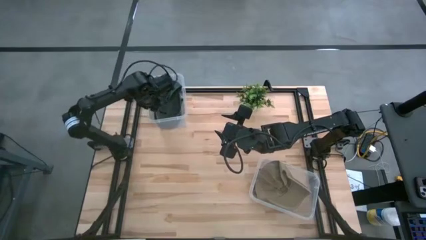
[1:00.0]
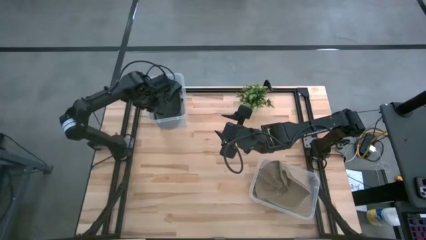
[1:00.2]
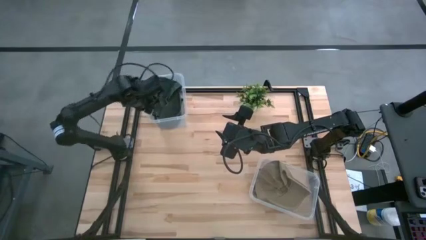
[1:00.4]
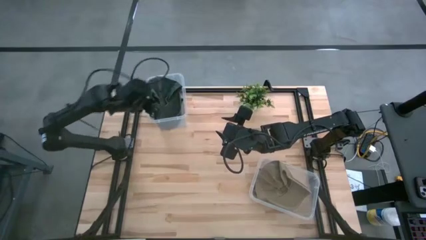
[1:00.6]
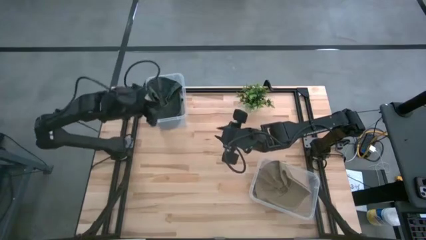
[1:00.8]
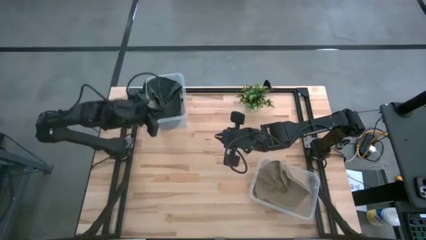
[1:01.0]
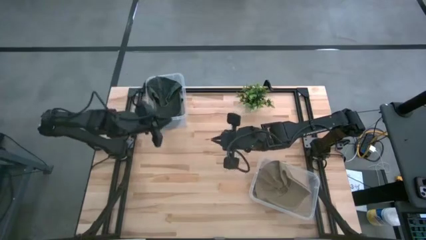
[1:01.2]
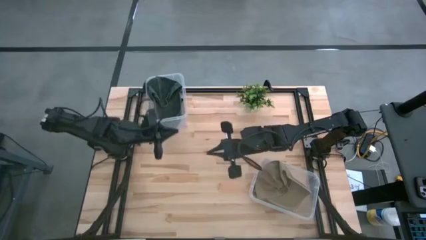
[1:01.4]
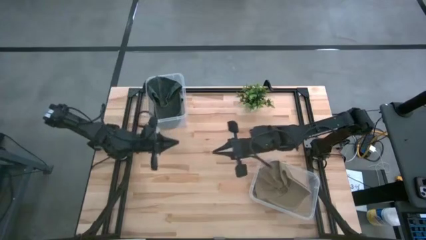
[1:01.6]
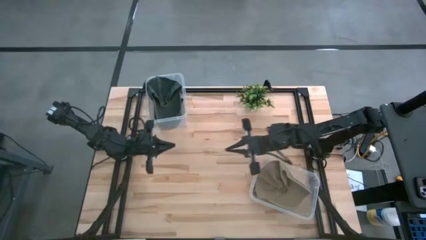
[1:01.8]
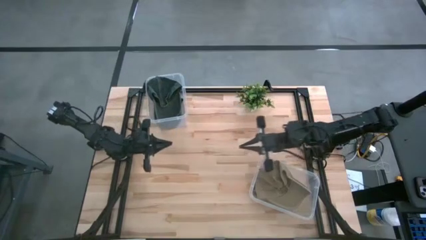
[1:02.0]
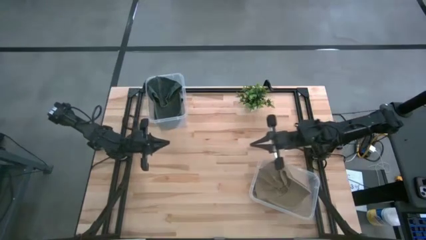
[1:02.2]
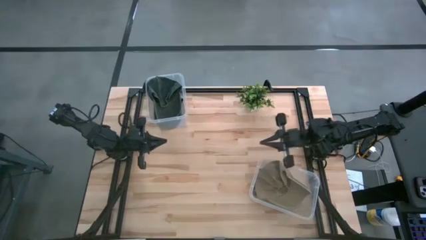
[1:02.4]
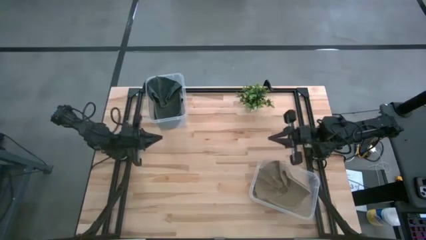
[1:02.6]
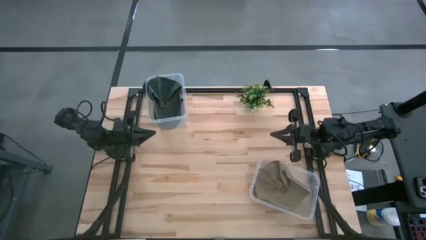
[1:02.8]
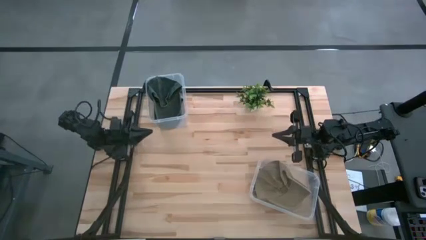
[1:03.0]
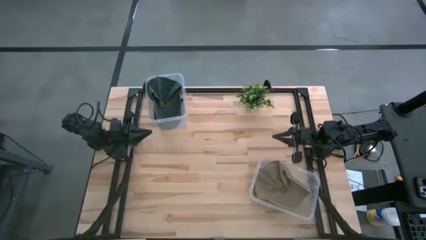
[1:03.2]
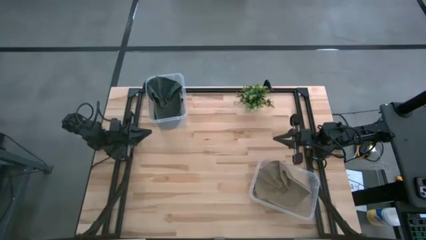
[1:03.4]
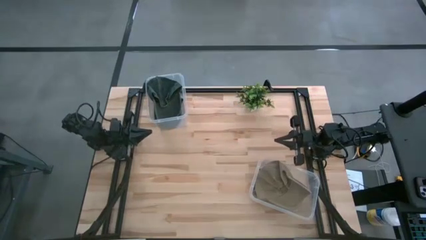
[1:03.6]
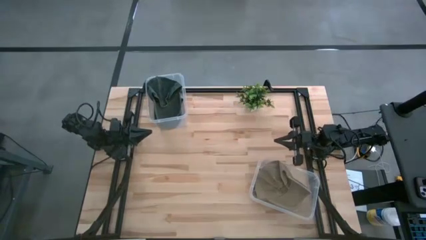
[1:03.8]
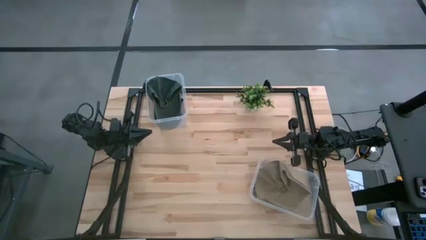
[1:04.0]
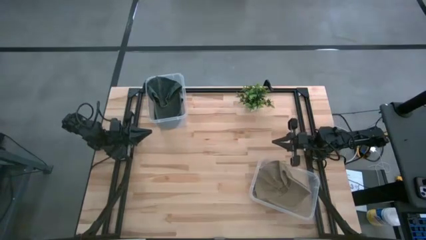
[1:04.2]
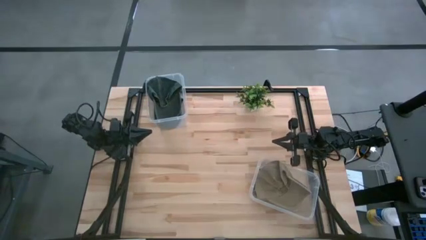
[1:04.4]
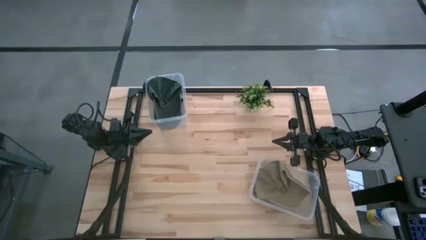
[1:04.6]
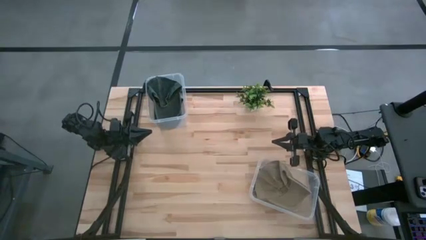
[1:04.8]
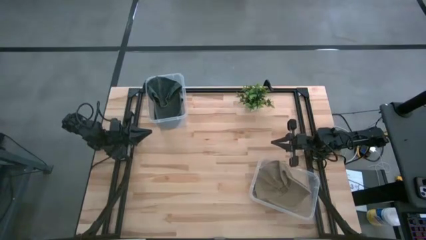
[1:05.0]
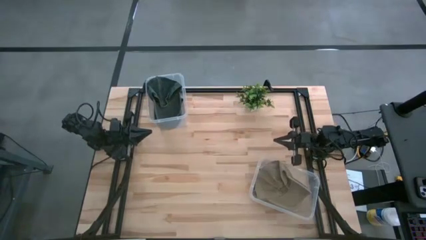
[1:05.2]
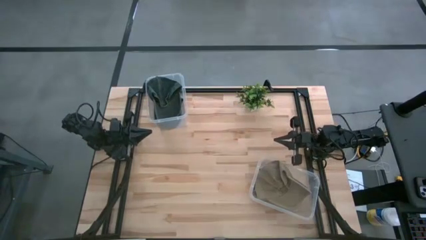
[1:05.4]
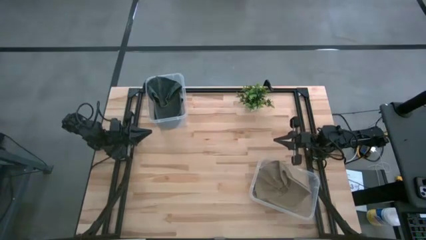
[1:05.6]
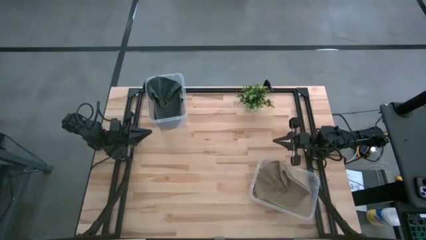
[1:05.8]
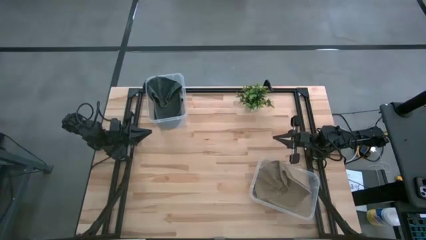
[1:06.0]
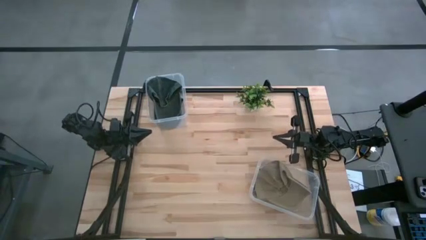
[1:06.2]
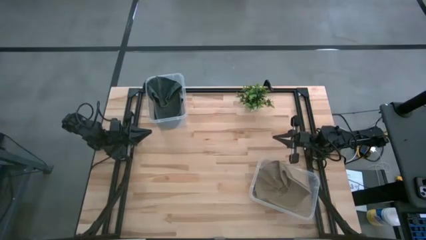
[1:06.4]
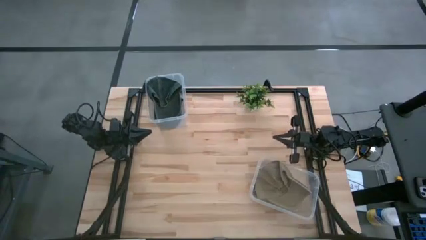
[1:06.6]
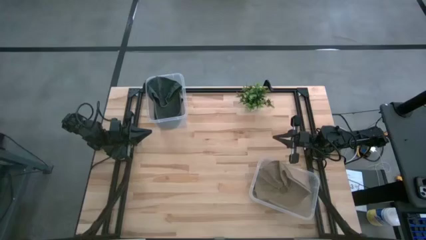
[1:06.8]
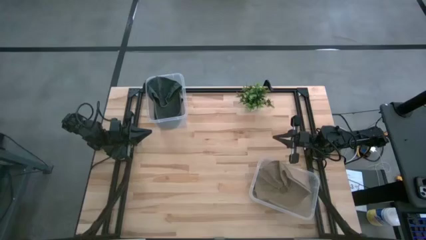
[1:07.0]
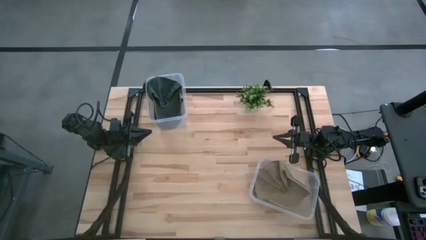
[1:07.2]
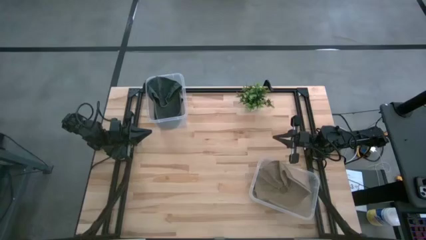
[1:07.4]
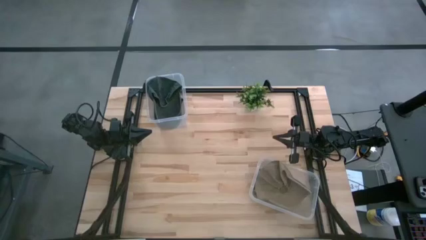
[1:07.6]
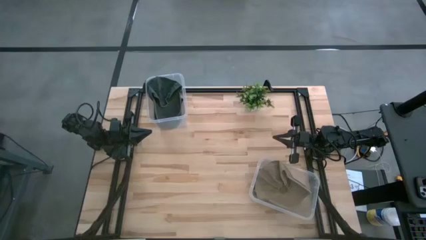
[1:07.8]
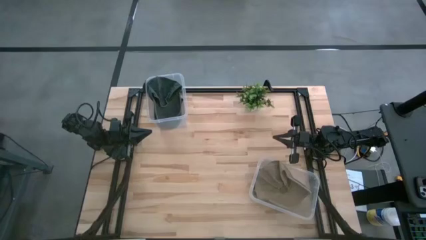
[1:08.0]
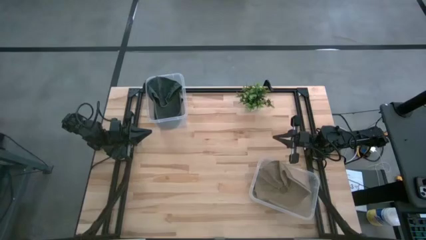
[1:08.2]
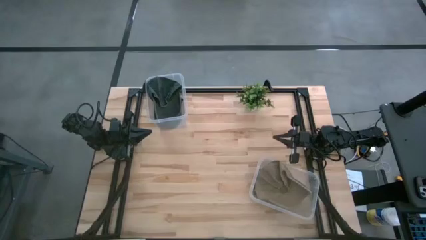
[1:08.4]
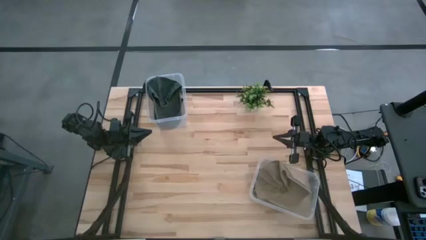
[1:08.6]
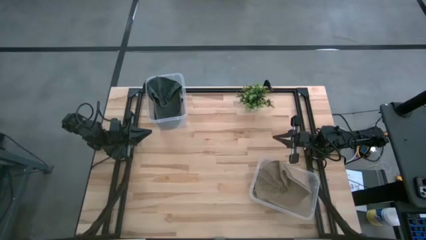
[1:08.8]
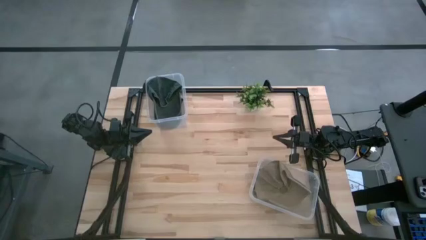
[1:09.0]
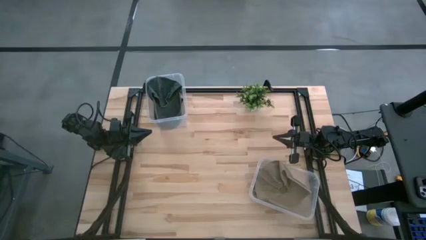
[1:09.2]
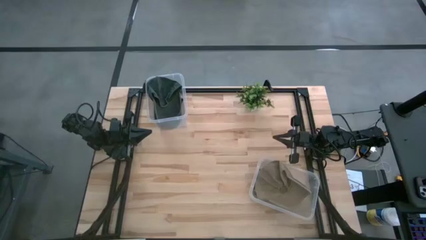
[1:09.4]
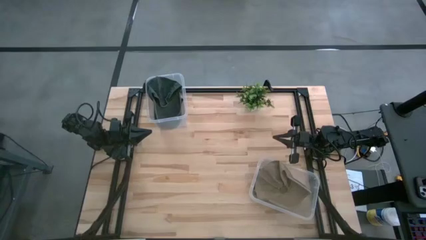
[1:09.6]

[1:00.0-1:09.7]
Task: Pick & Place hat
Return to Home Position
